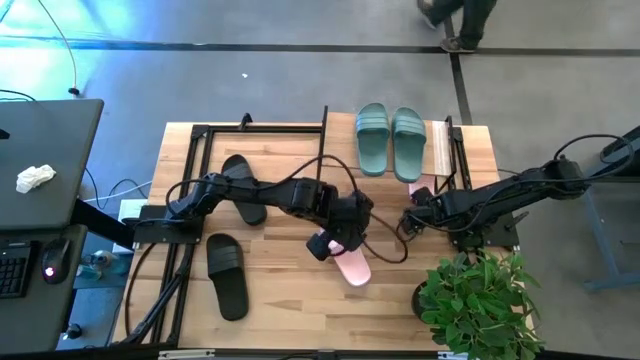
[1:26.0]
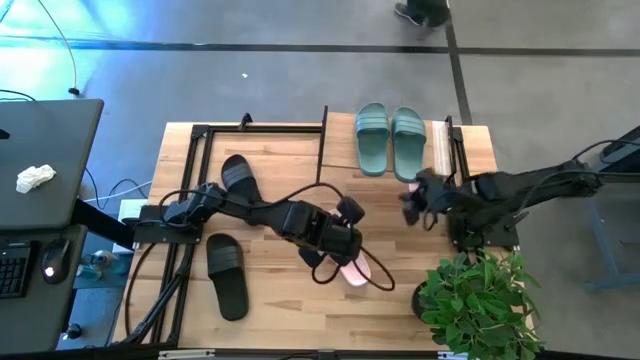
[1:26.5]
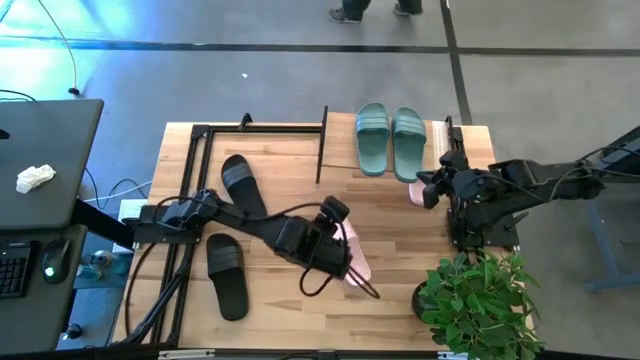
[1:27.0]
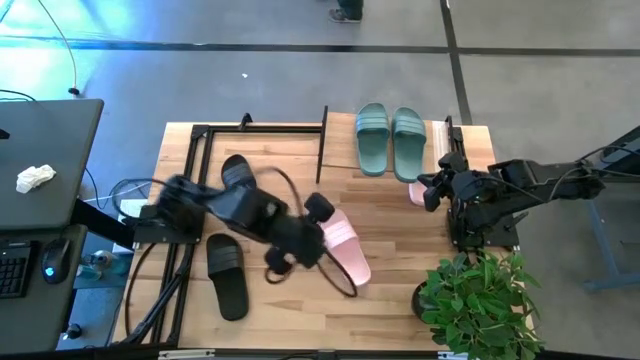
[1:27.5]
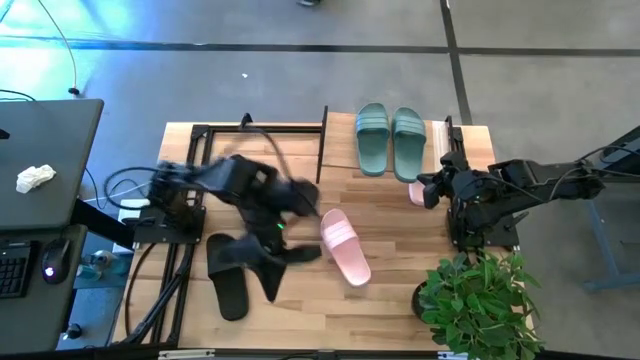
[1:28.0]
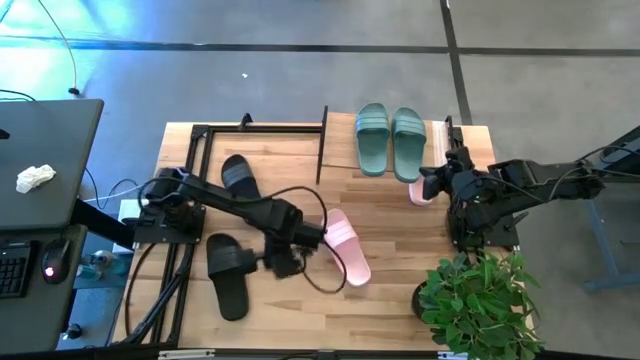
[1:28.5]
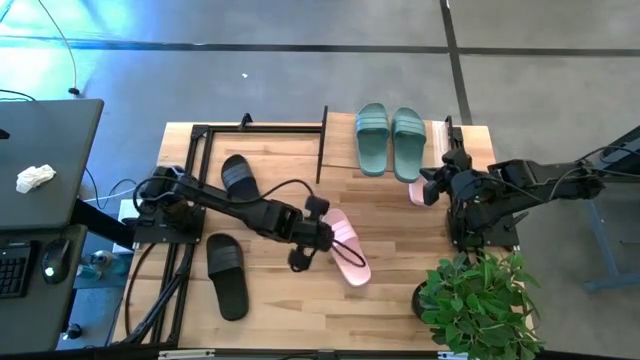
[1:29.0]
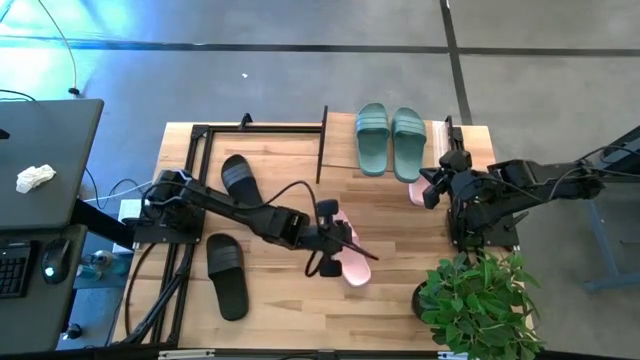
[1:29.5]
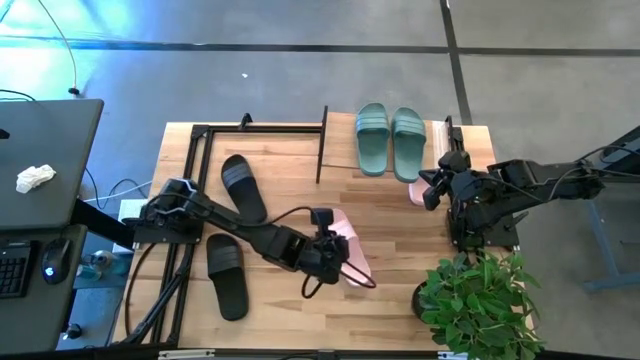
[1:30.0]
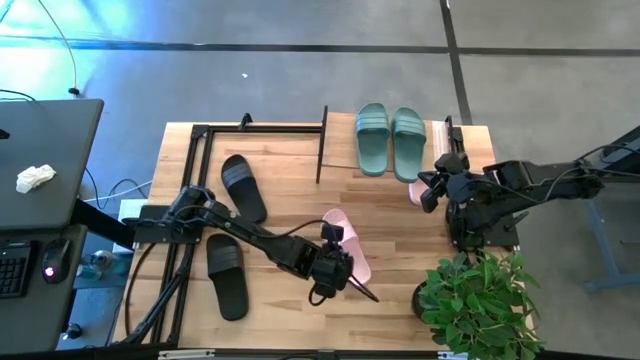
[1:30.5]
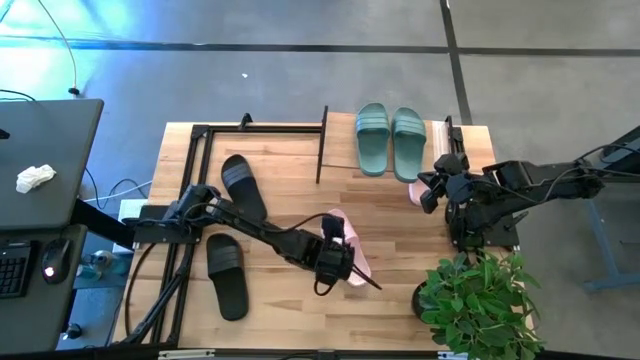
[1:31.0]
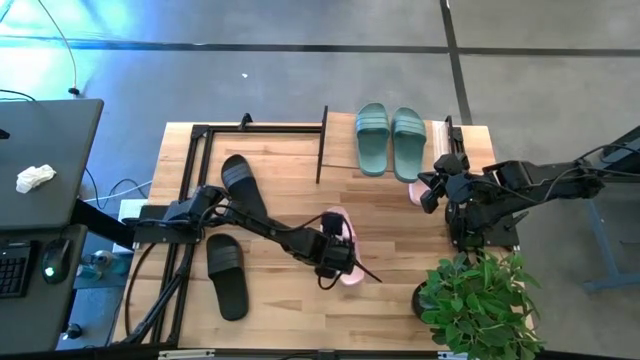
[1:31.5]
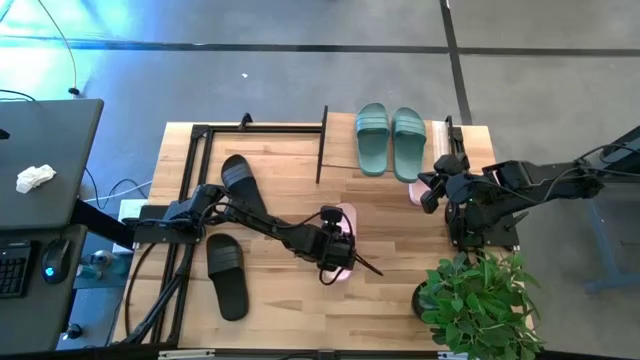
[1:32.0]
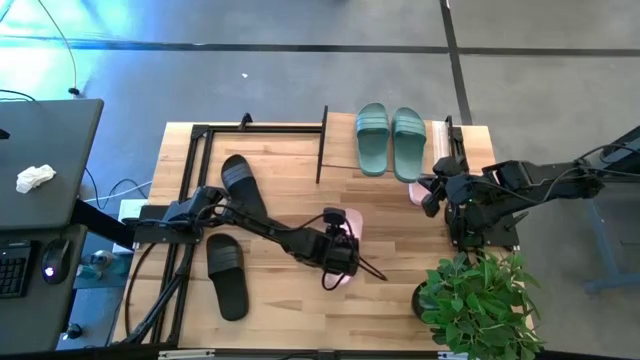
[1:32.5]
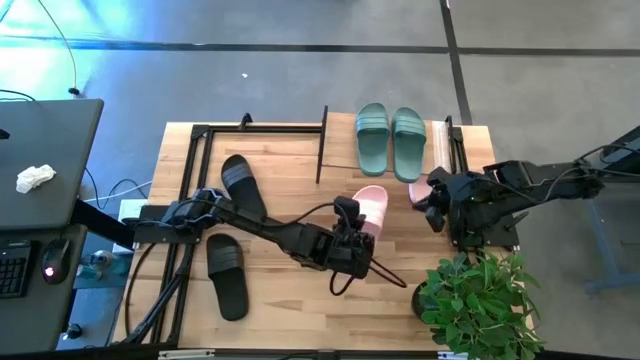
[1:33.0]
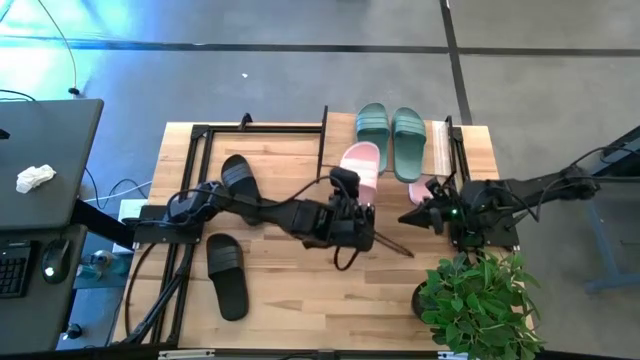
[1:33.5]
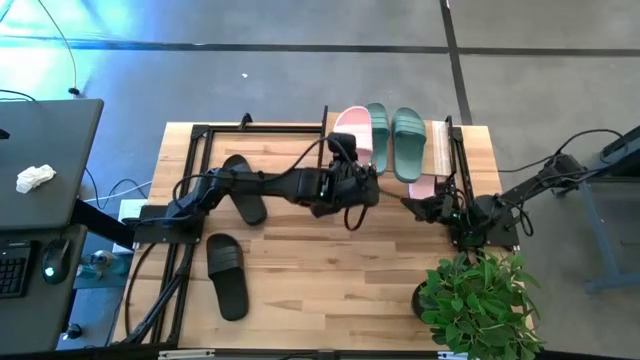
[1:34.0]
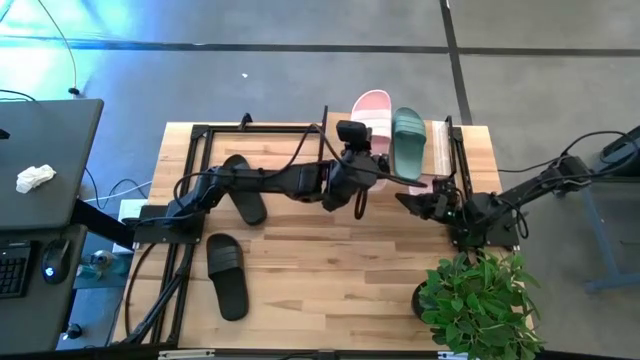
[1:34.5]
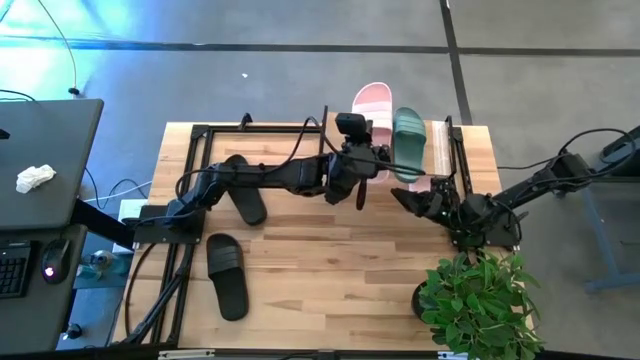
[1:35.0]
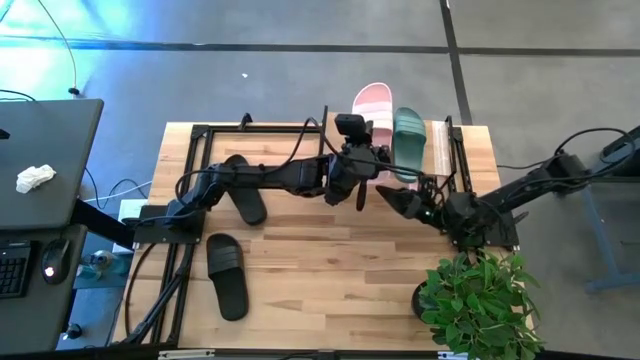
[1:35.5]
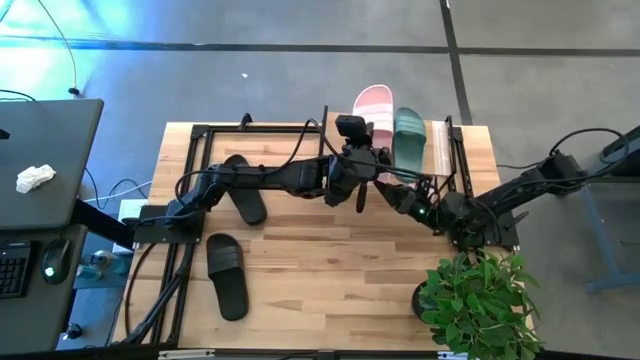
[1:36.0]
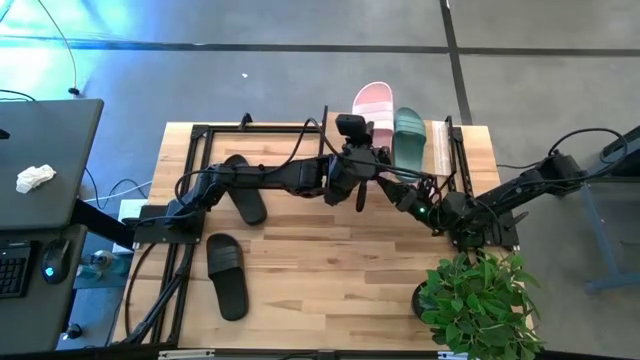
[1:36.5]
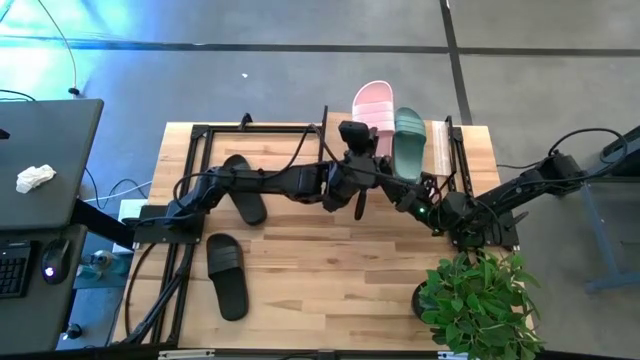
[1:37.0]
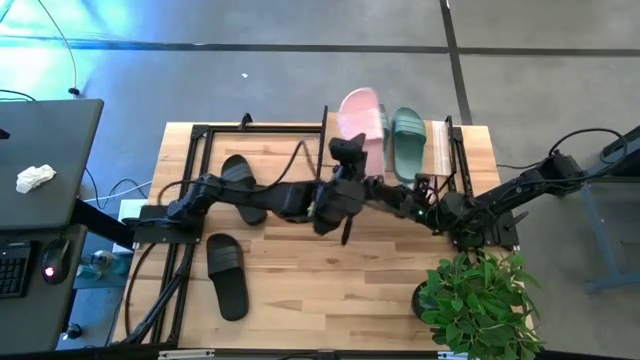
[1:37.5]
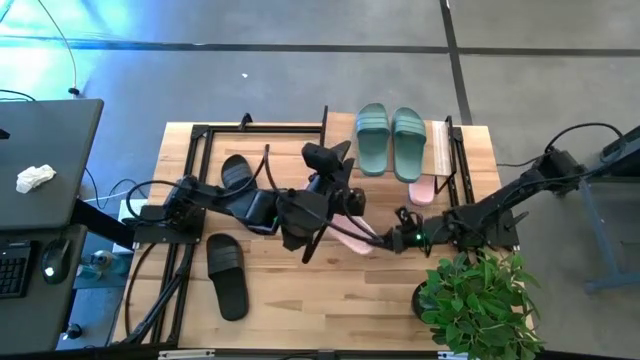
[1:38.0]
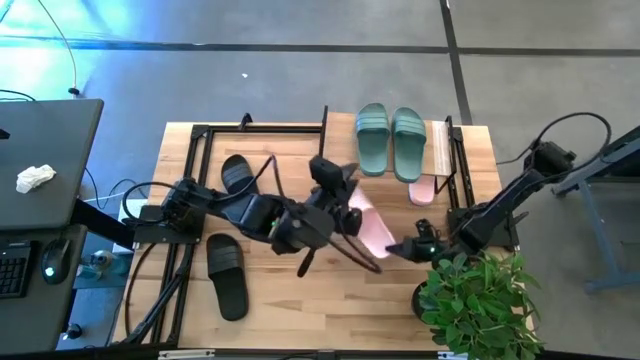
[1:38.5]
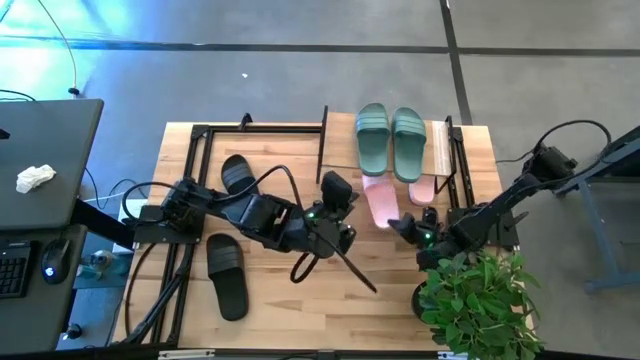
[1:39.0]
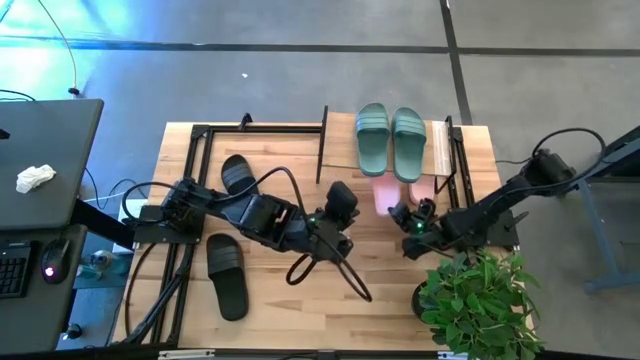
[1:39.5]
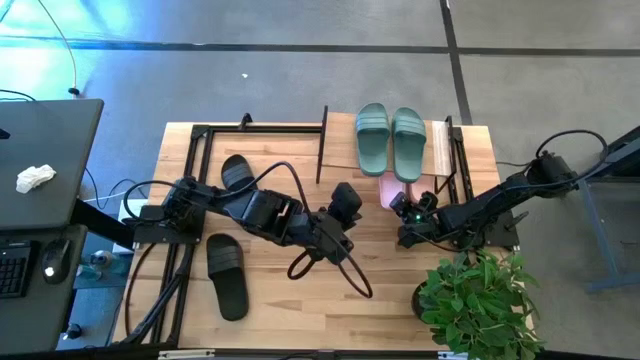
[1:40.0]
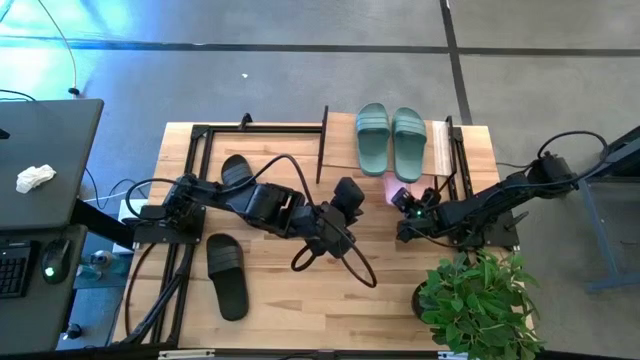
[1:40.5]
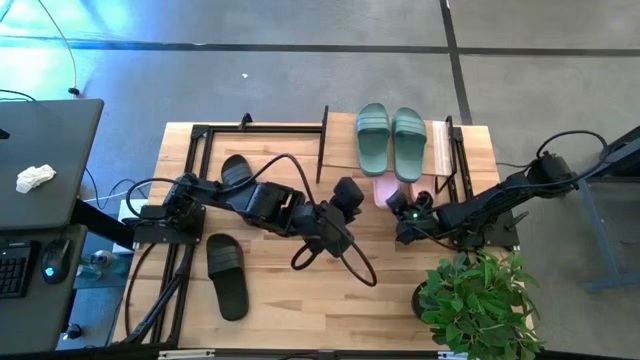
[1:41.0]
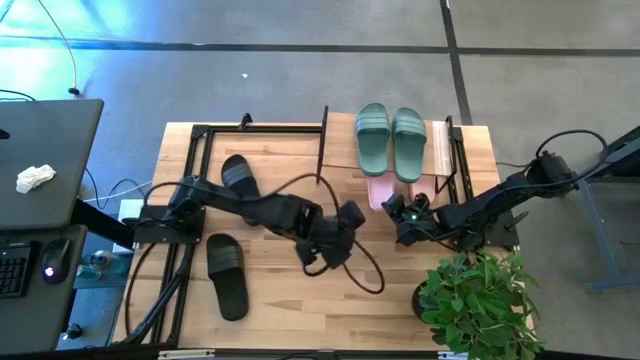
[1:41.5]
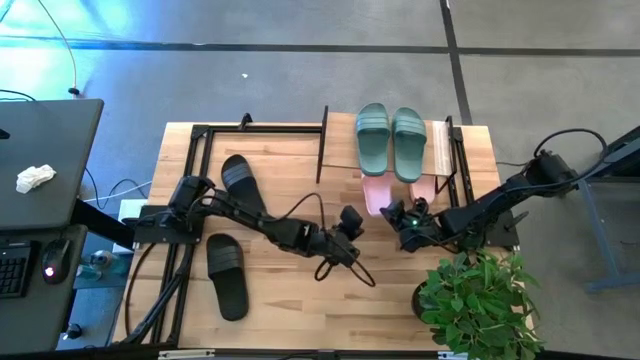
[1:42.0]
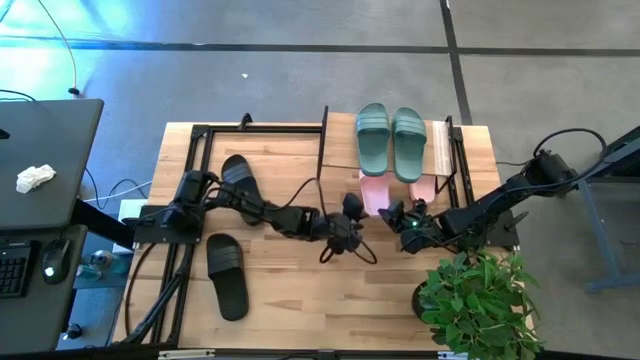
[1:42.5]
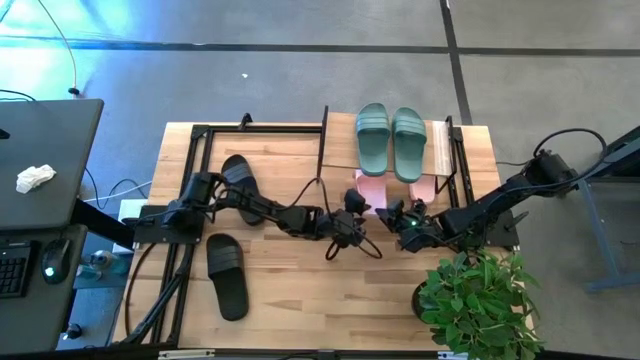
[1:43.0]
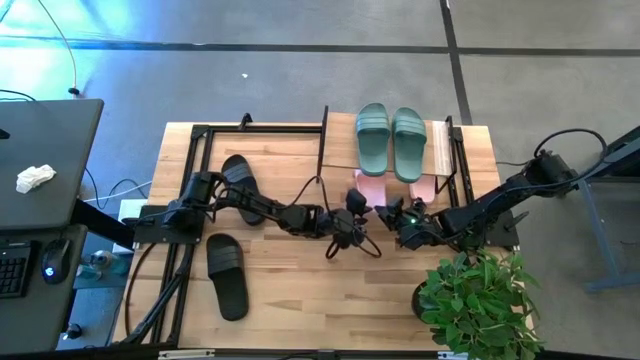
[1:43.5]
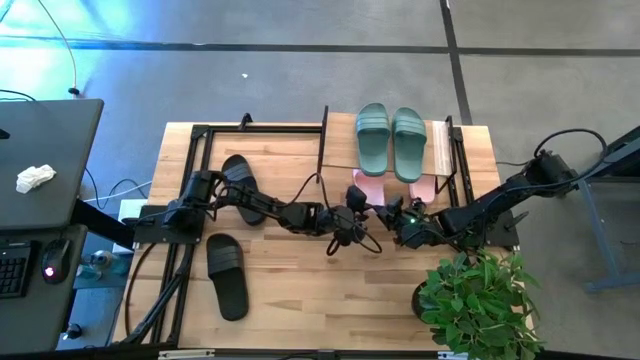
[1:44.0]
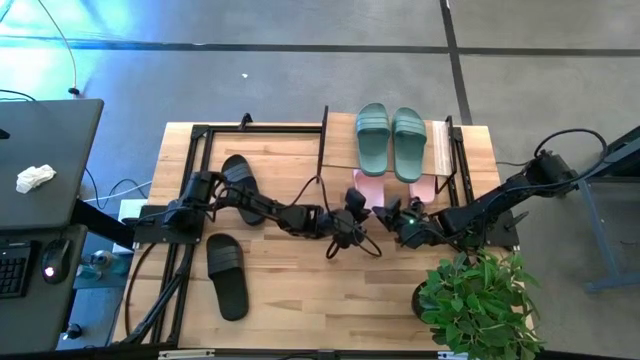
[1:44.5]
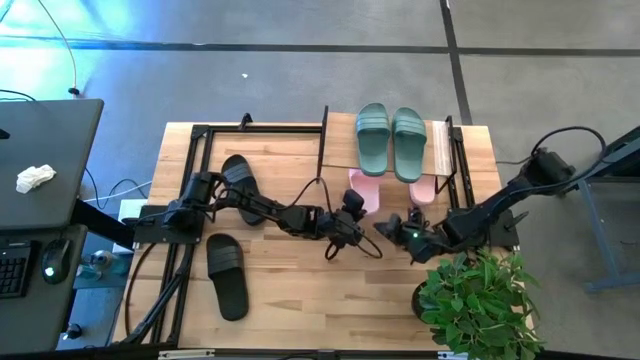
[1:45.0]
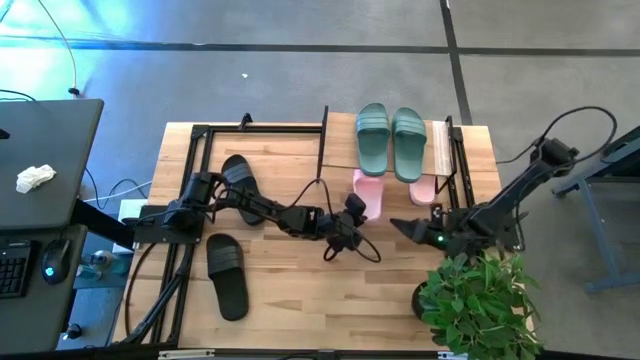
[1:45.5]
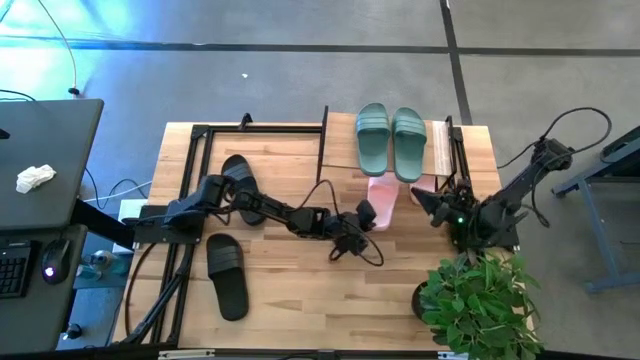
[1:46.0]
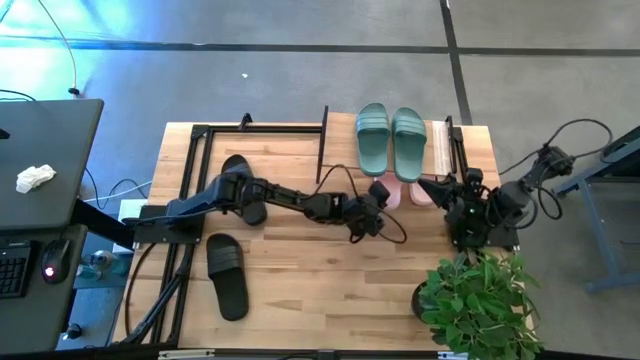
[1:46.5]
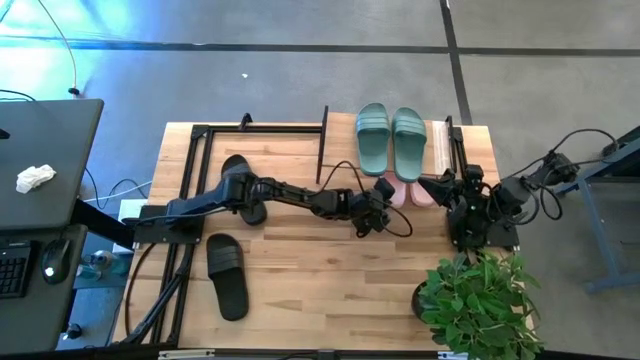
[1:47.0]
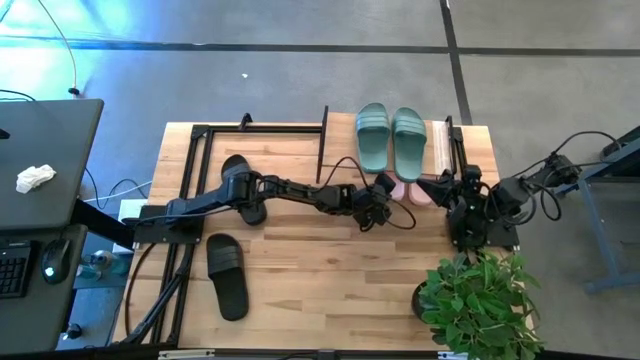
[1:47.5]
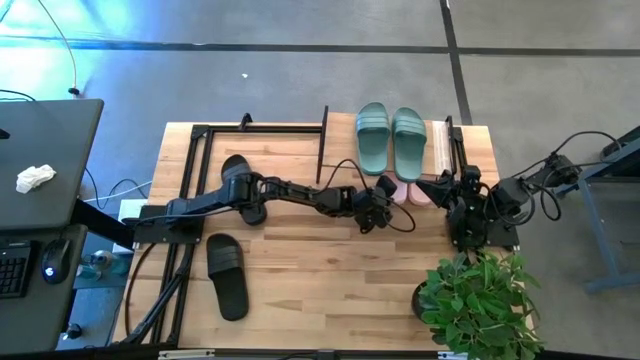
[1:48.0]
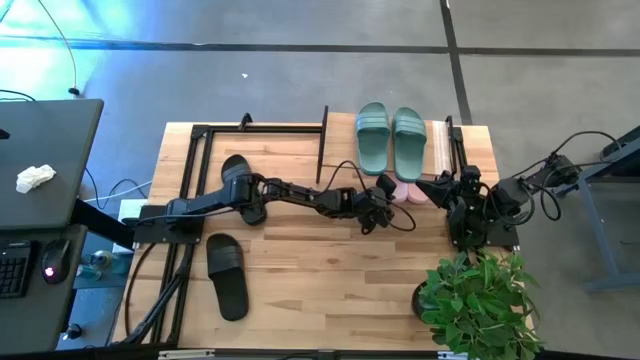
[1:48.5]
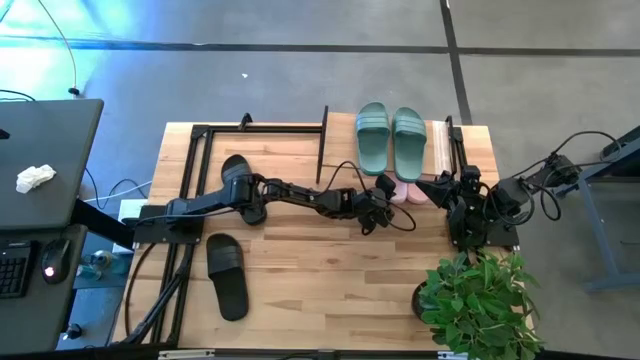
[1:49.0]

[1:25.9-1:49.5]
Task: Pick and place slides into the shelf
Put the pink slides under the shelf
